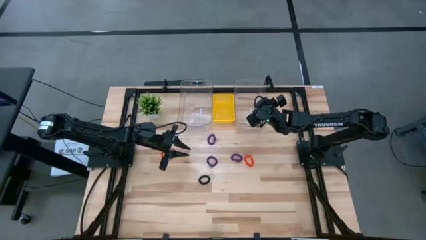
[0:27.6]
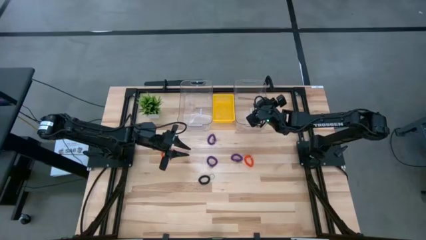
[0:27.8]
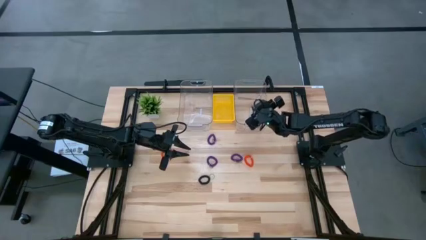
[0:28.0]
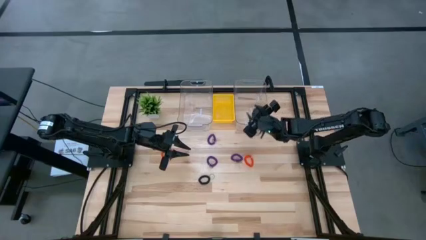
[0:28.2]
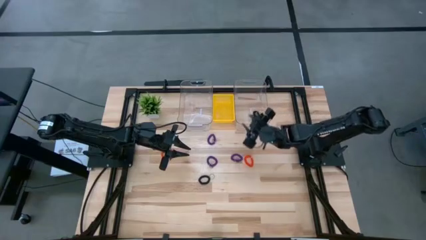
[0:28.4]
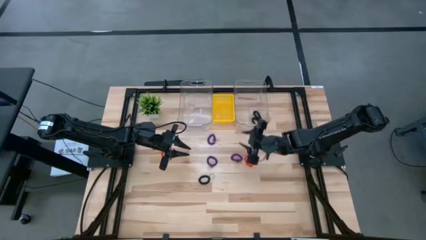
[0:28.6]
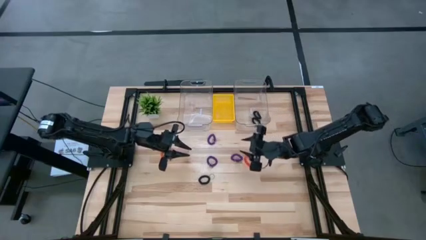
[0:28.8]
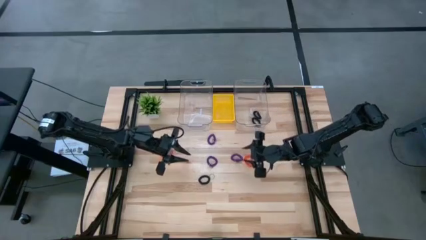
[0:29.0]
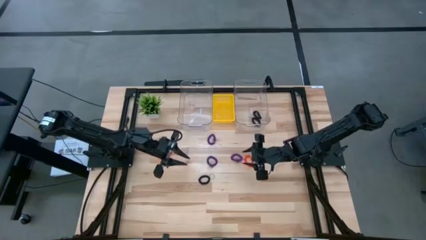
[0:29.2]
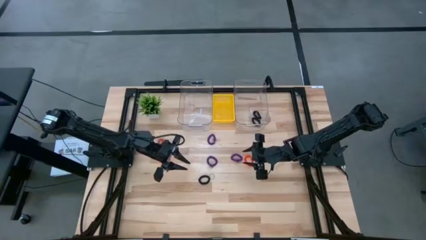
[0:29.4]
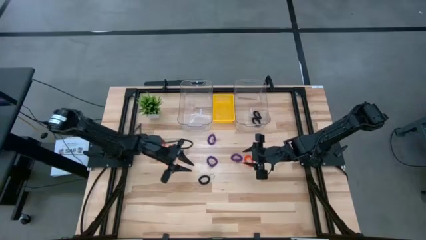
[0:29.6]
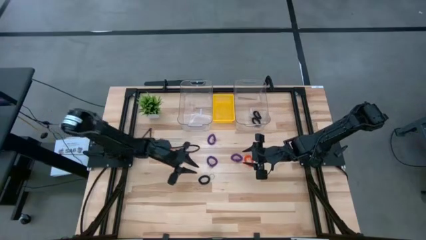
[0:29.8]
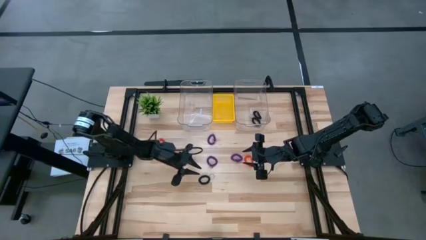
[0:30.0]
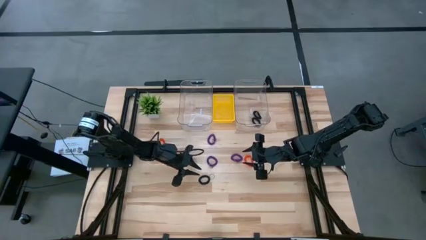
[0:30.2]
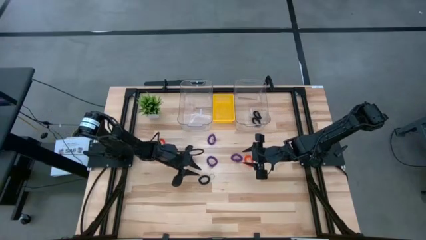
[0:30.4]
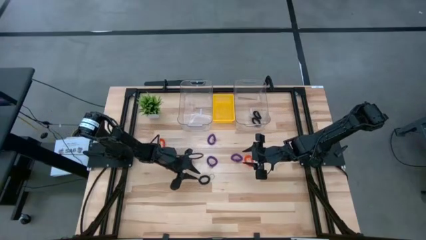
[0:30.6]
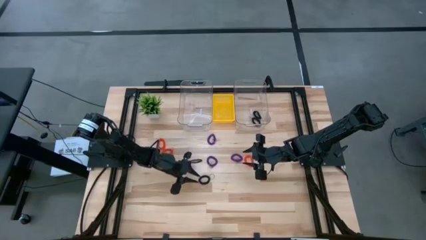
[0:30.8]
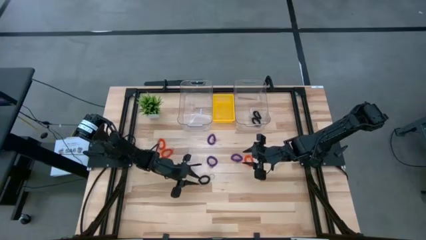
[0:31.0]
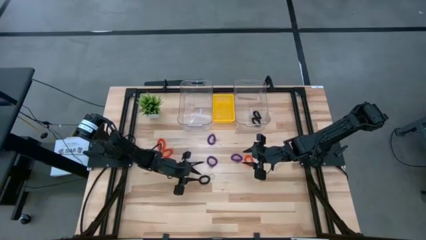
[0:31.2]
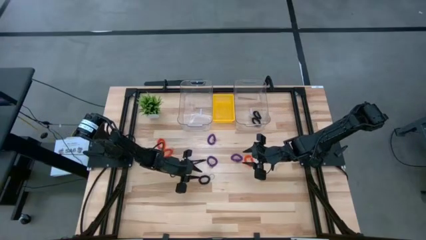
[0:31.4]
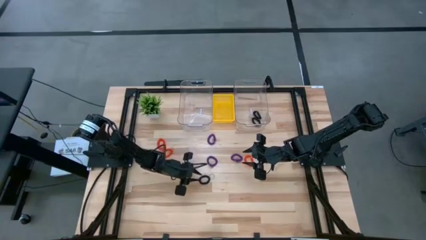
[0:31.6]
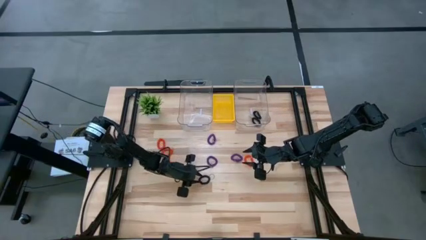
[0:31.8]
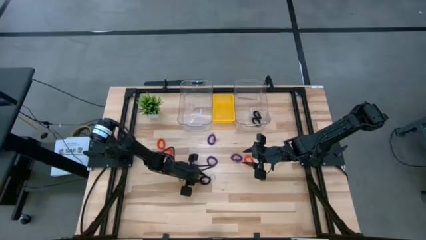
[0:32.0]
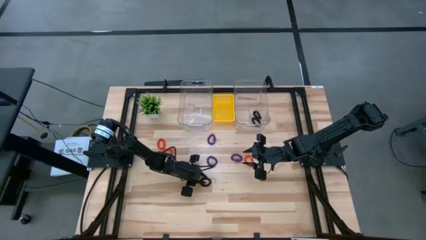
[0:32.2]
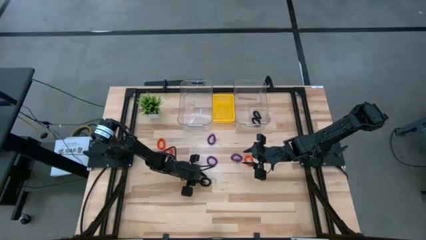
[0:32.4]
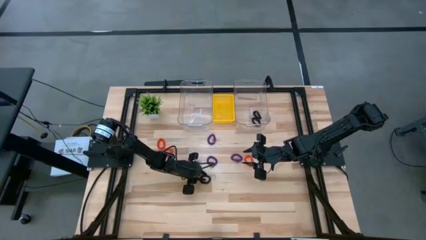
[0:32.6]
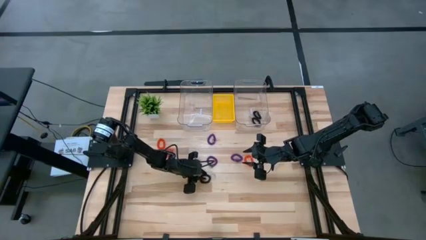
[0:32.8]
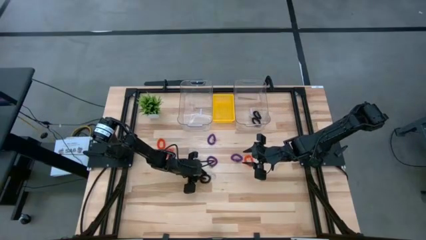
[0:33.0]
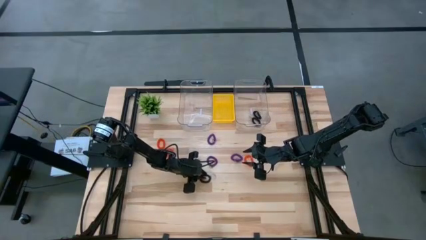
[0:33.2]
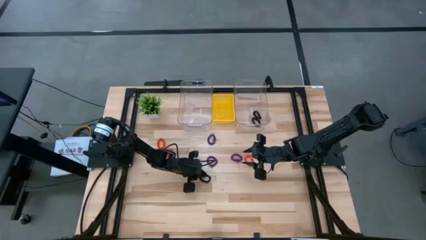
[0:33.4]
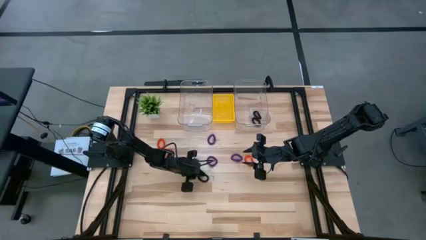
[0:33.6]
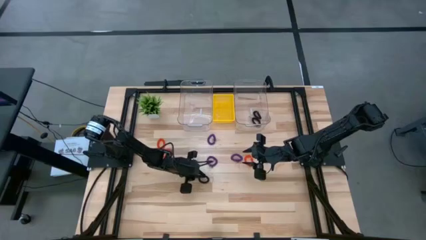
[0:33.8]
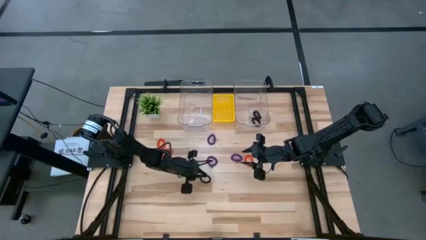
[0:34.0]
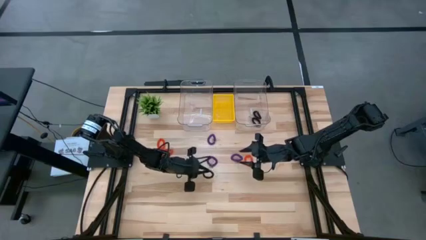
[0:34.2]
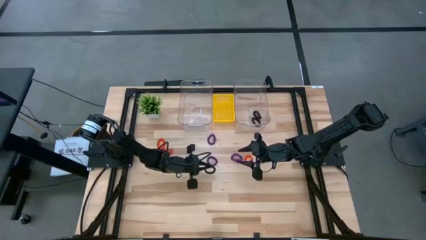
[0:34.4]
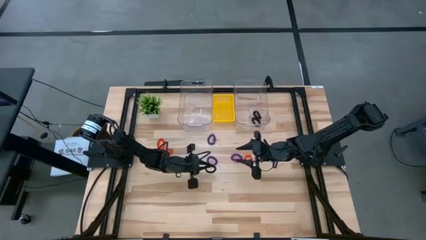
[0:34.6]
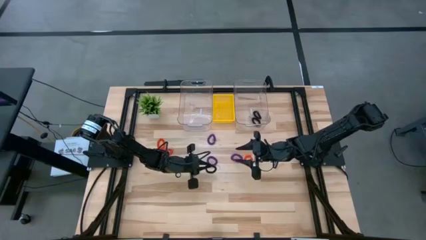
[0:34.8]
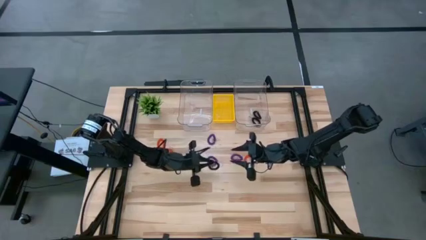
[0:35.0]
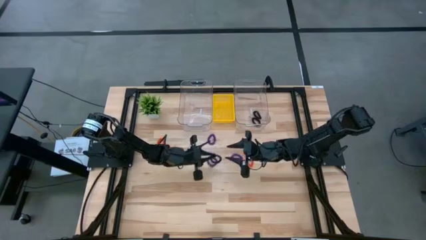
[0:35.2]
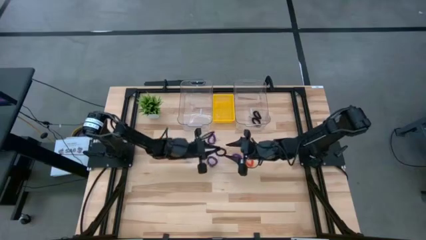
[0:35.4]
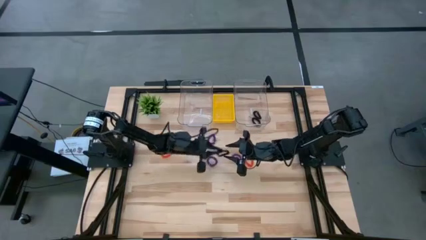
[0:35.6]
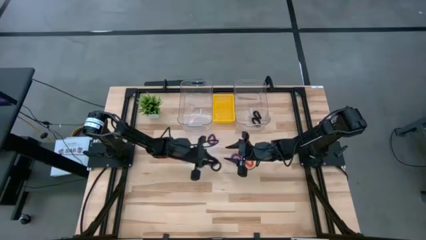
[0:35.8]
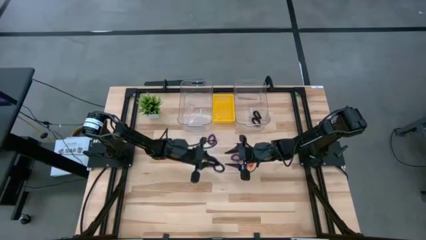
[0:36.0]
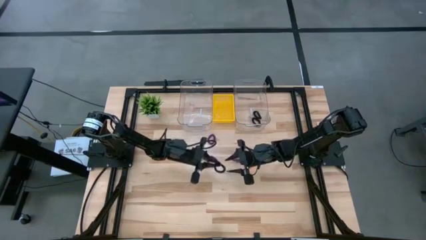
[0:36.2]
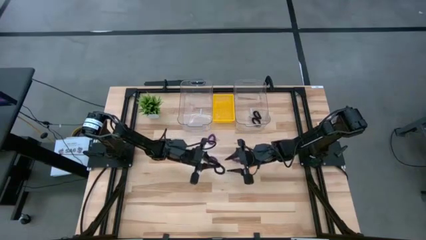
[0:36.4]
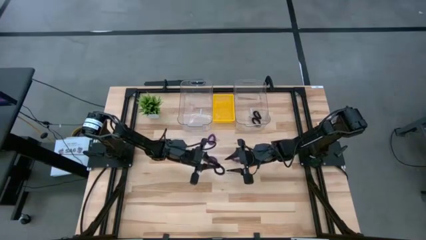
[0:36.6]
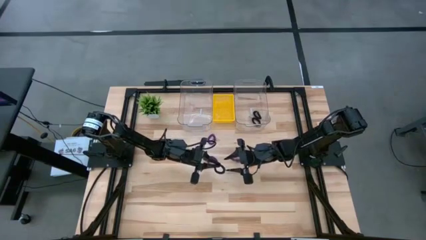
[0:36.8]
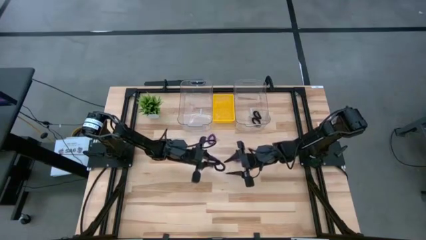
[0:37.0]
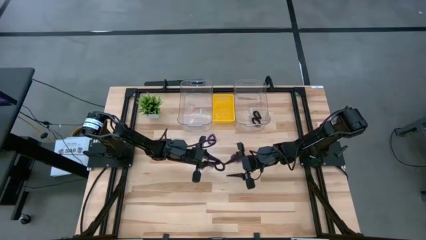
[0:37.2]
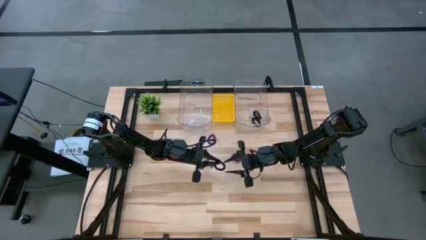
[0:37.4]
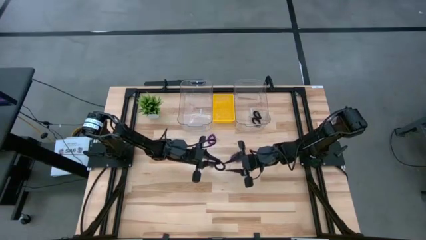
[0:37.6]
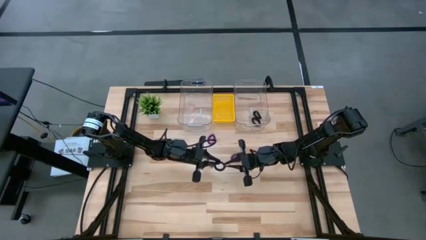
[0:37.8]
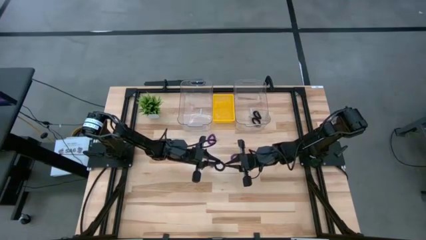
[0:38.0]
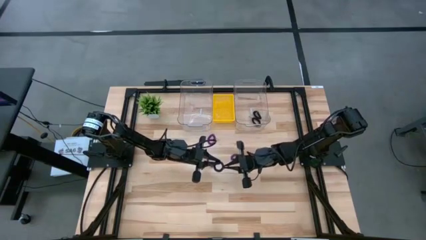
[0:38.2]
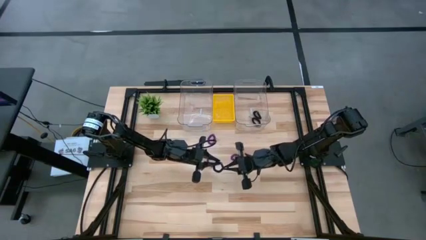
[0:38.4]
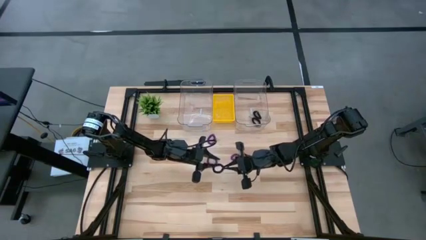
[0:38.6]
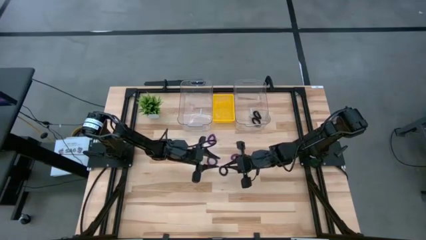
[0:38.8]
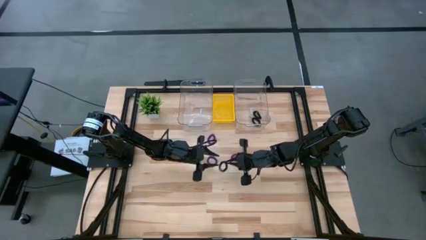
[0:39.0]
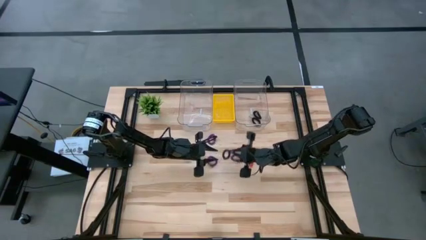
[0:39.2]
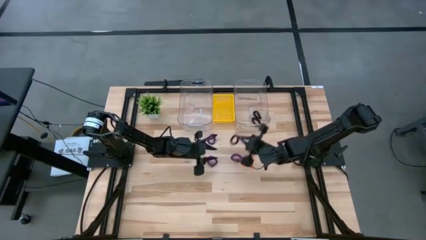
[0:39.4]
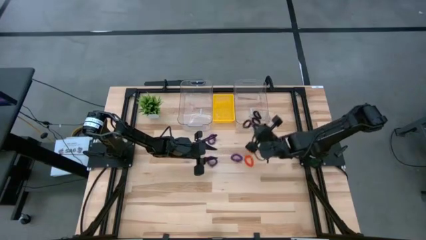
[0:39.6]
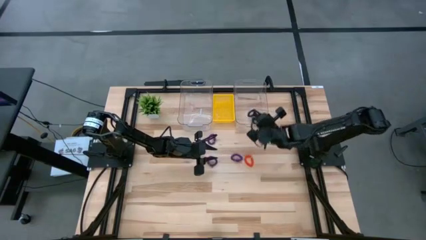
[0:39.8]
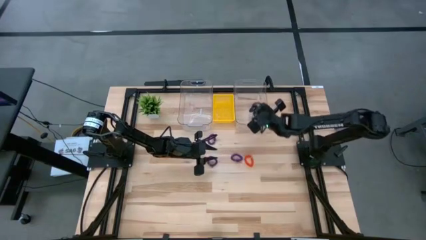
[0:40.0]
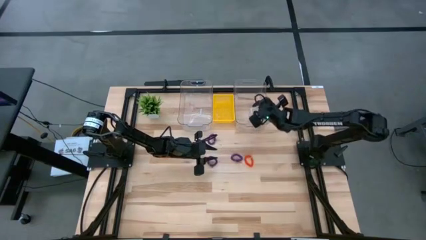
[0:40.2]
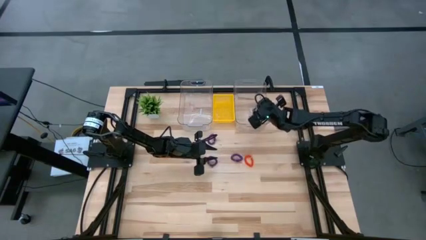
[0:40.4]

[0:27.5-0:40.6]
Task: Sort spring keychains
Put the black spring keychain into the right transparent bin
